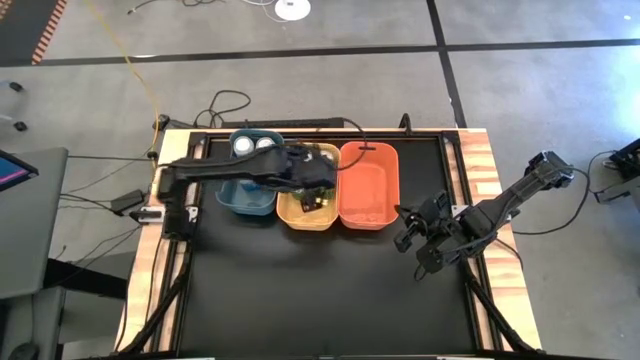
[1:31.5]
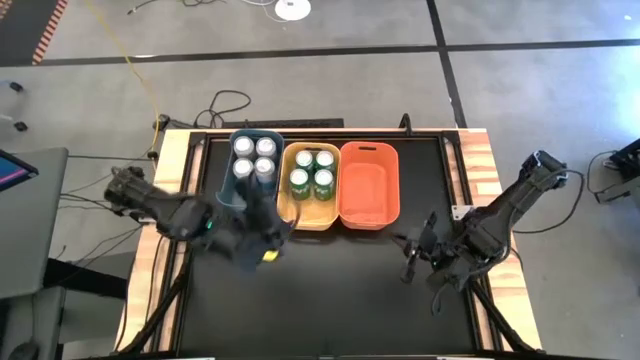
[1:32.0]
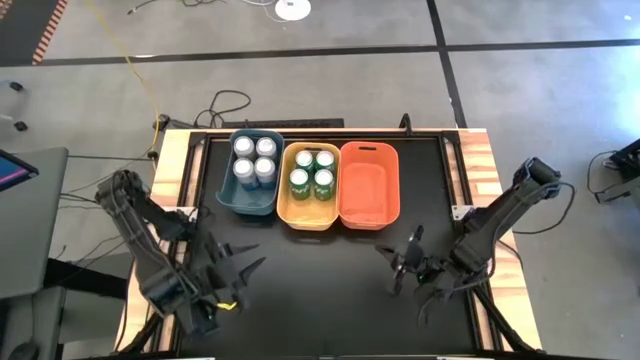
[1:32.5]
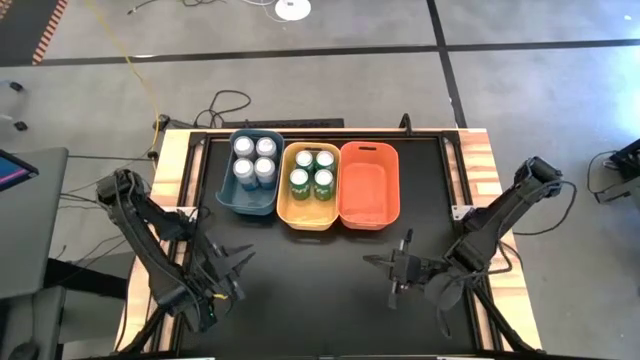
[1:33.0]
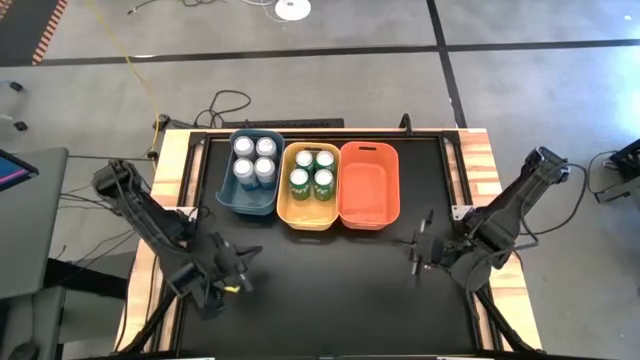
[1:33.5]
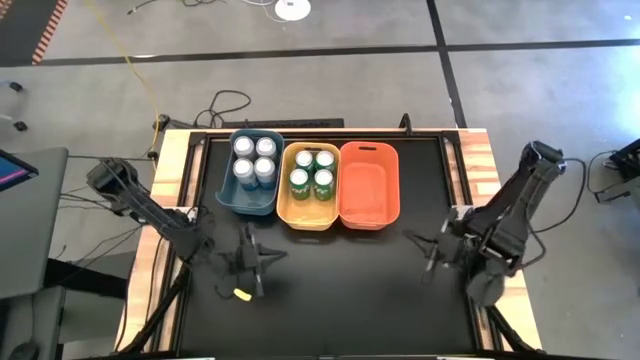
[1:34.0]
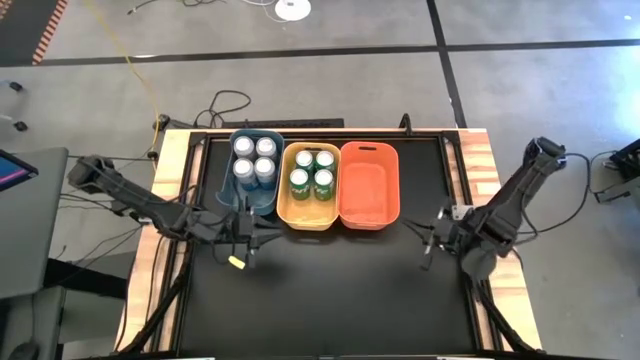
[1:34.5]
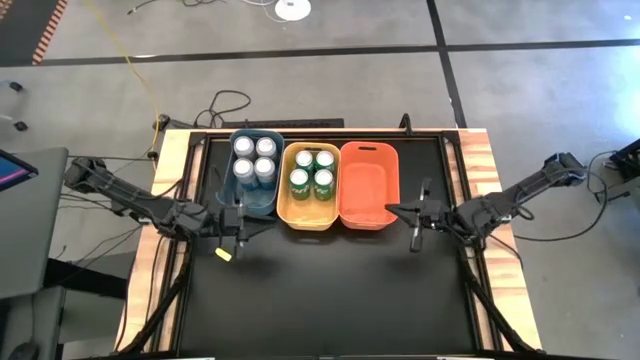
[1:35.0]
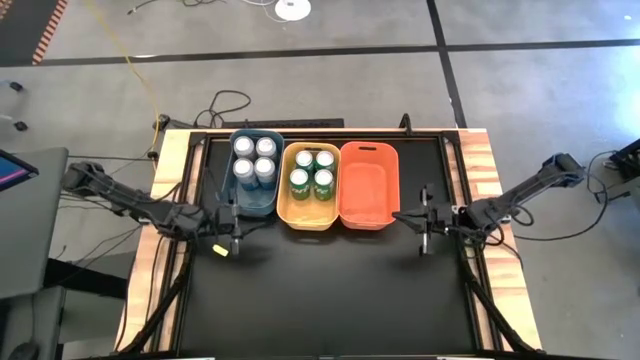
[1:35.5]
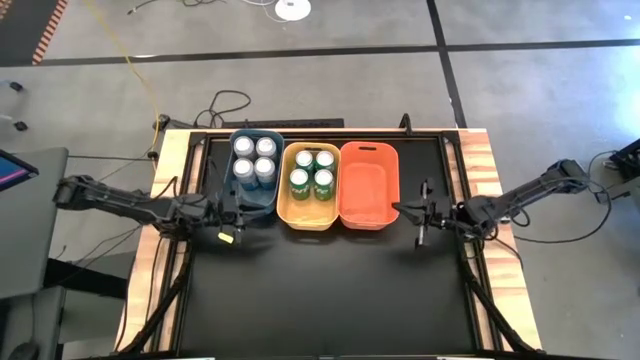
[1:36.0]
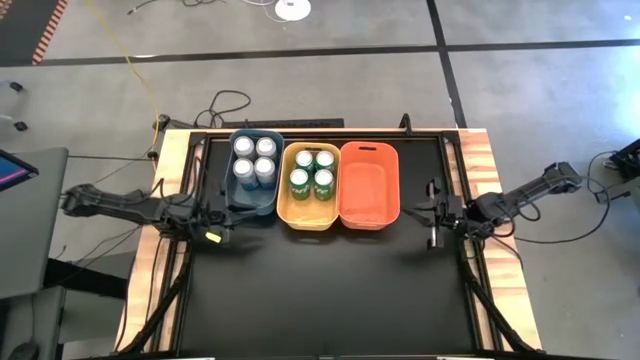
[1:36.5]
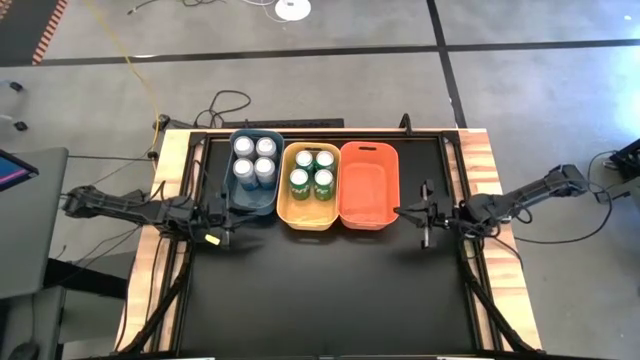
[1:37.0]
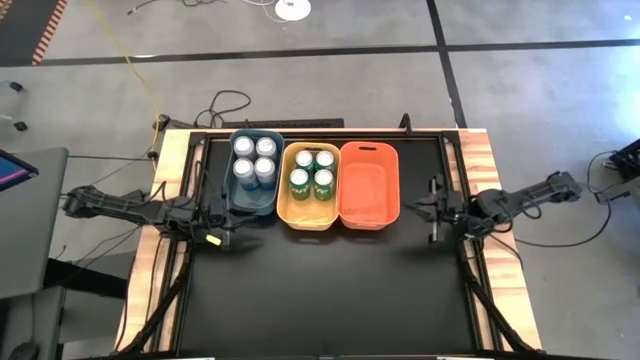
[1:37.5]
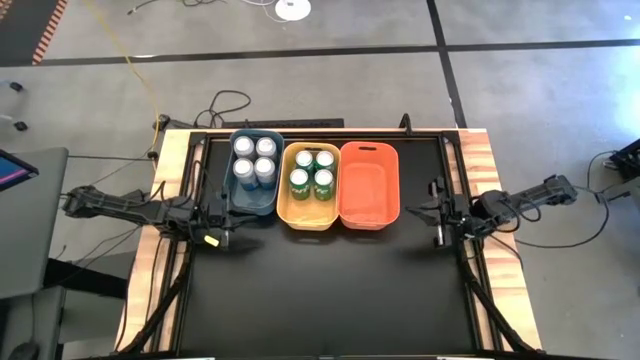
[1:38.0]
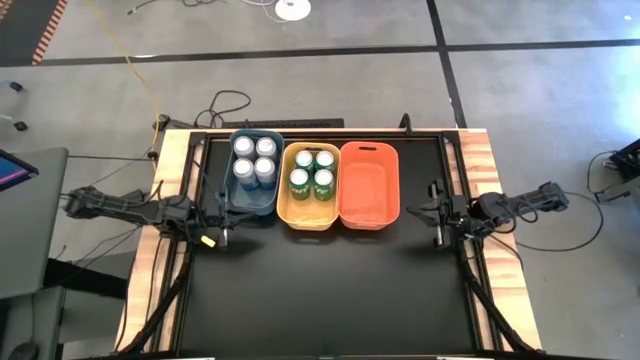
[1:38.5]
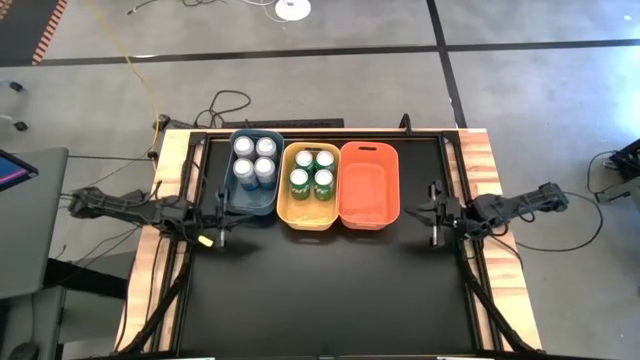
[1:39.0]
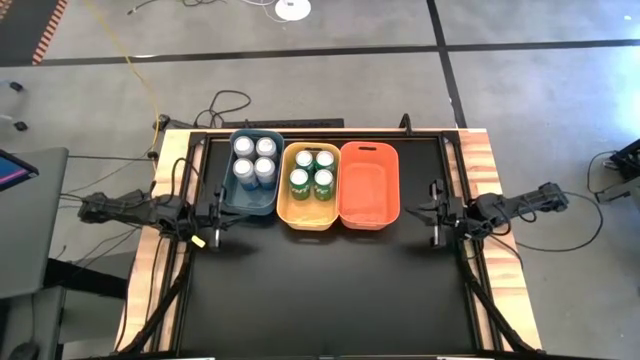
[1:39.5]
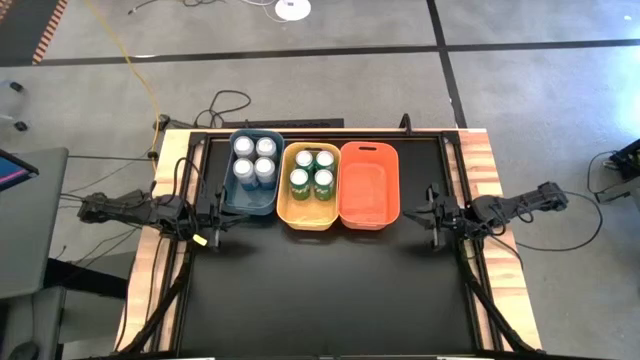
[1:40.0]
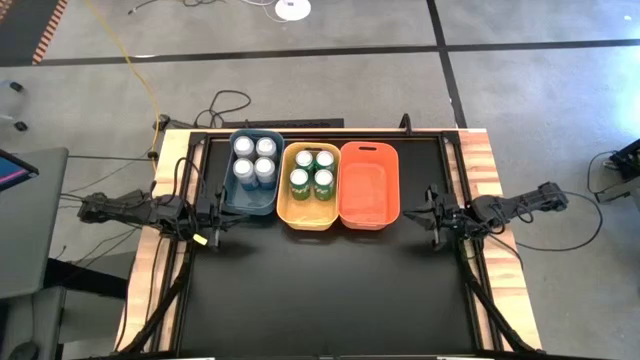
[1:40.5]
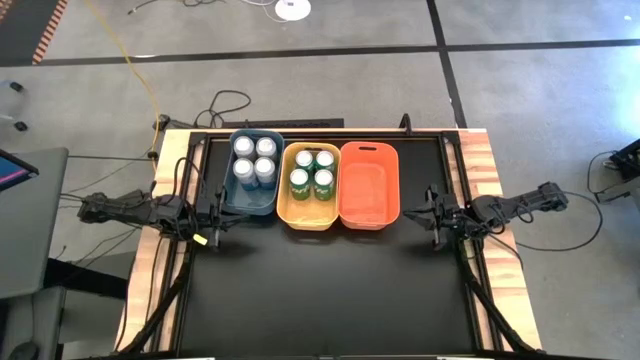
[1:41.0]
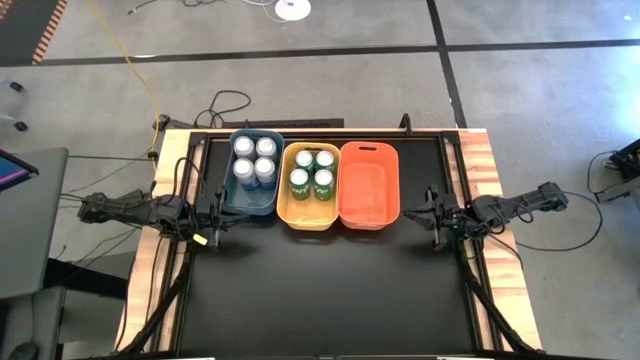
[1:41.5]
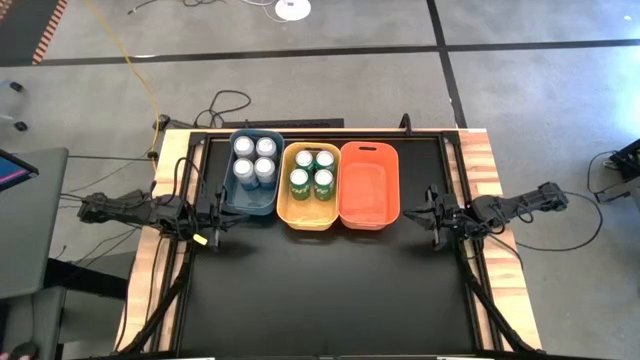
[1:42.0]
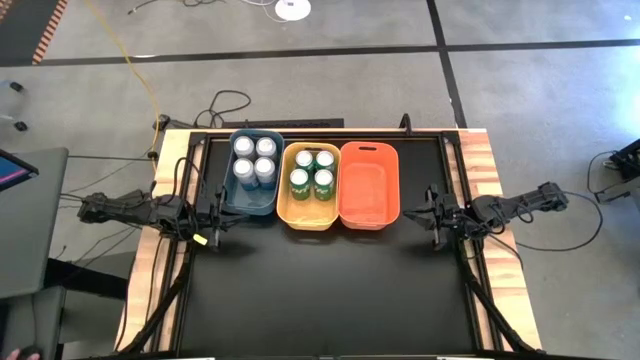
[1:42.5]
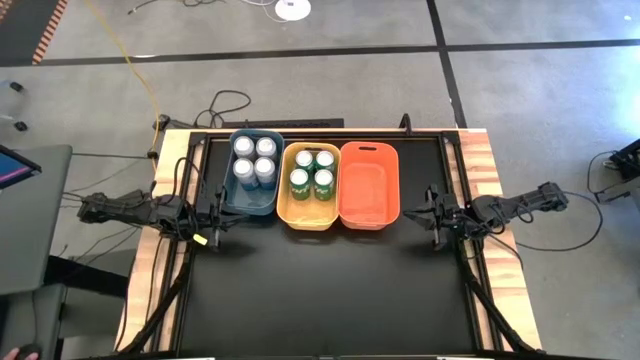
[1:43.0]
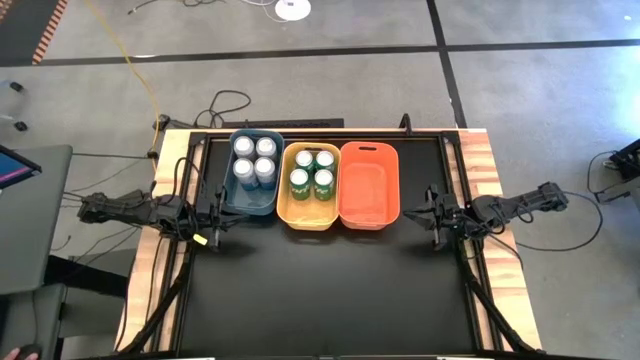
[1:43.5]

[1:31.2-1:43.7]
Task: Sort soda cans
Return to Home Position

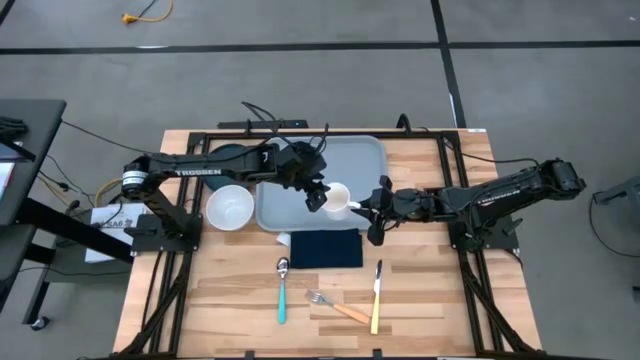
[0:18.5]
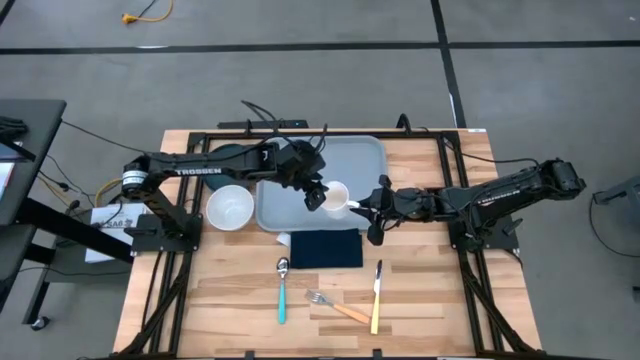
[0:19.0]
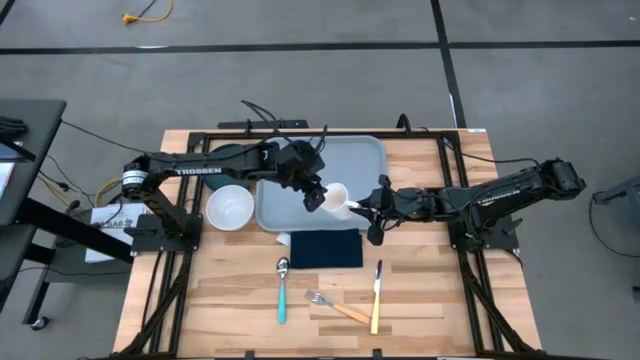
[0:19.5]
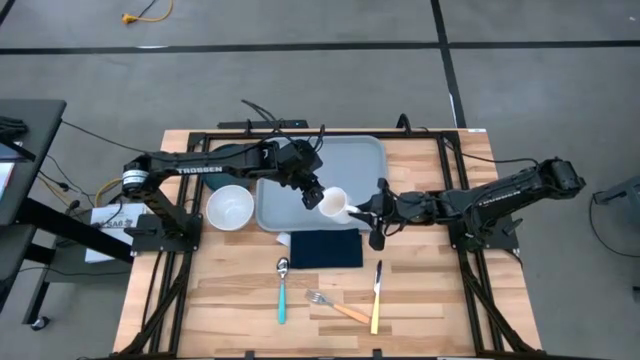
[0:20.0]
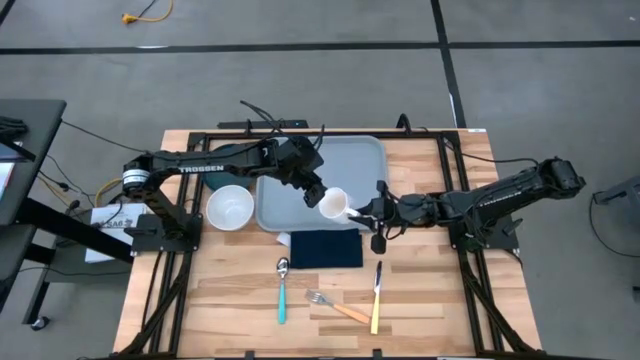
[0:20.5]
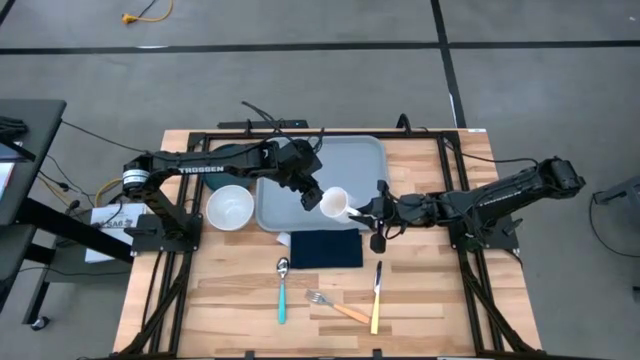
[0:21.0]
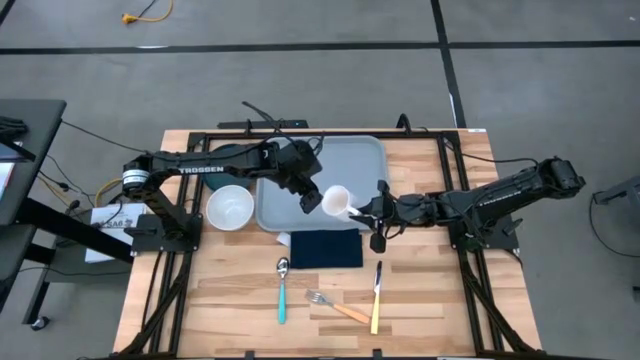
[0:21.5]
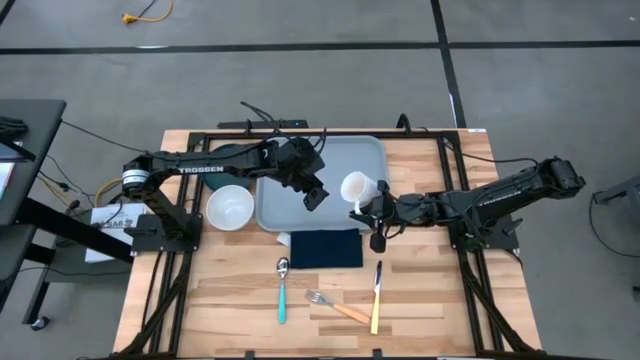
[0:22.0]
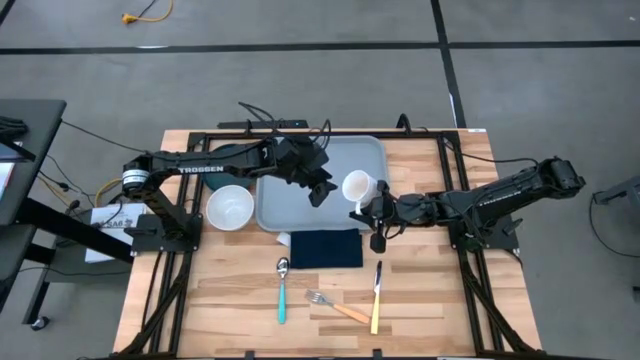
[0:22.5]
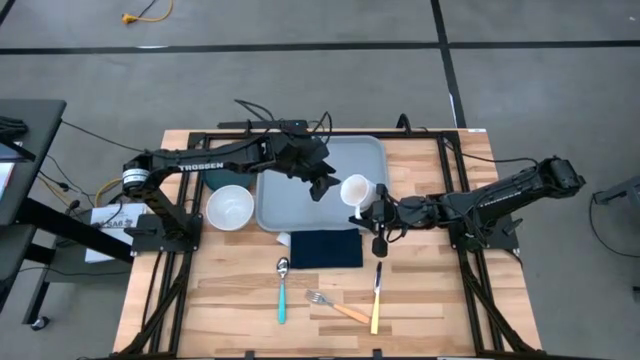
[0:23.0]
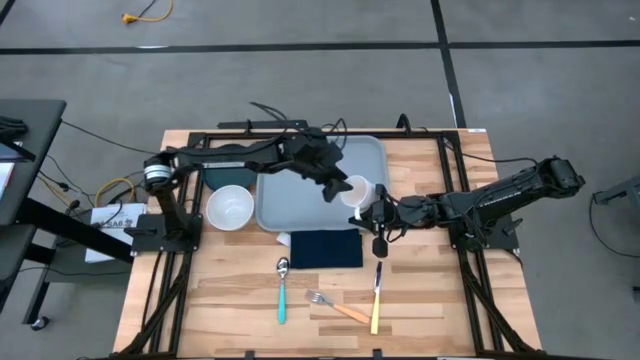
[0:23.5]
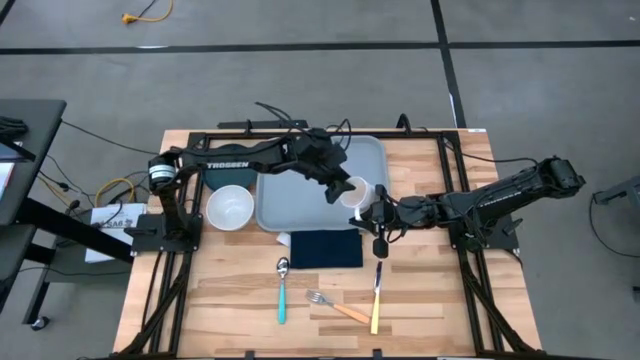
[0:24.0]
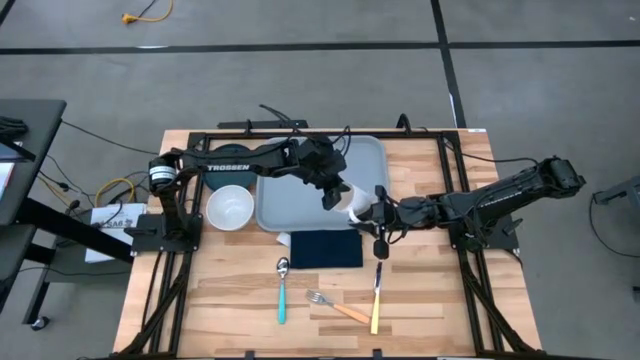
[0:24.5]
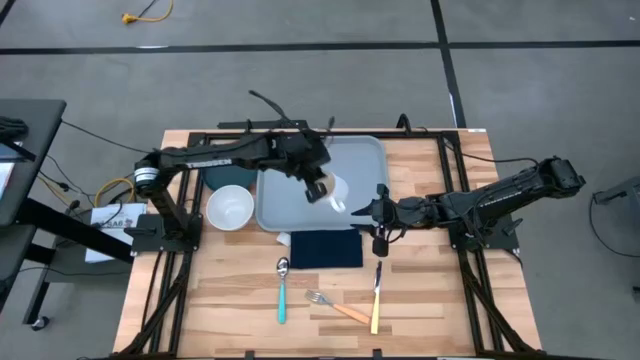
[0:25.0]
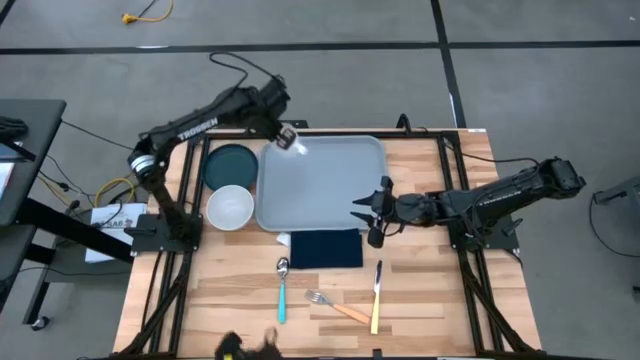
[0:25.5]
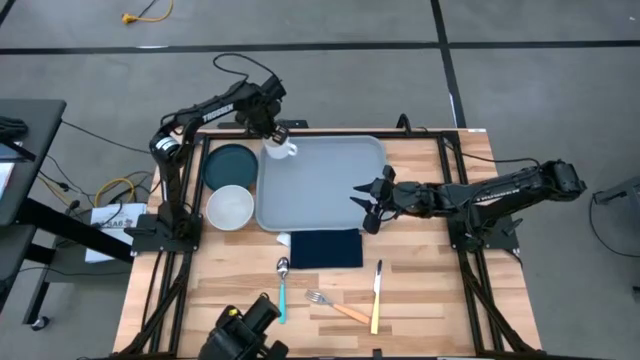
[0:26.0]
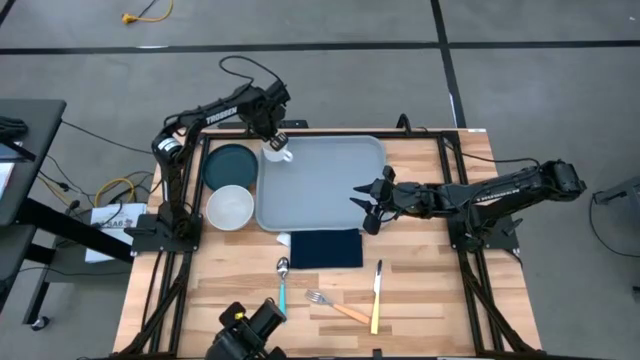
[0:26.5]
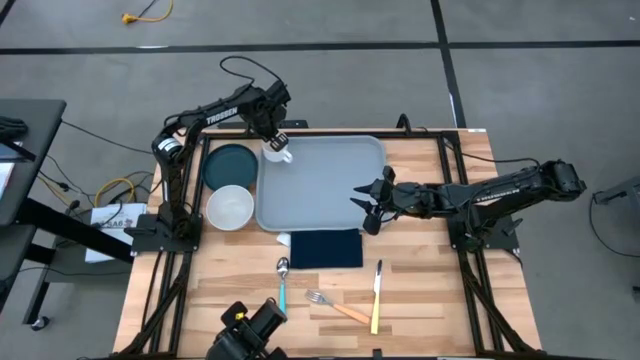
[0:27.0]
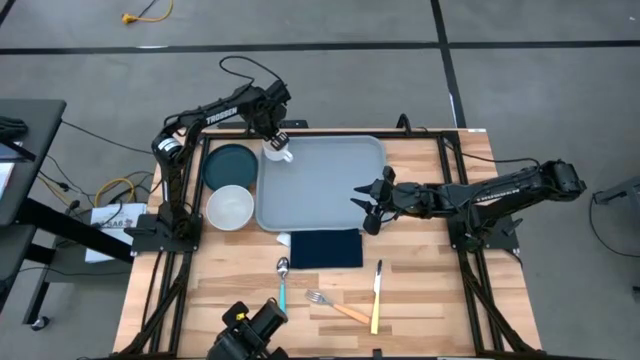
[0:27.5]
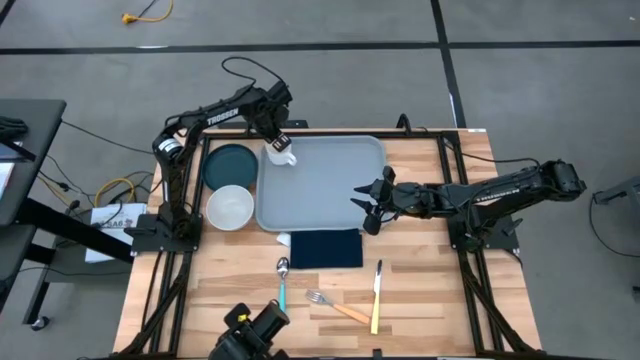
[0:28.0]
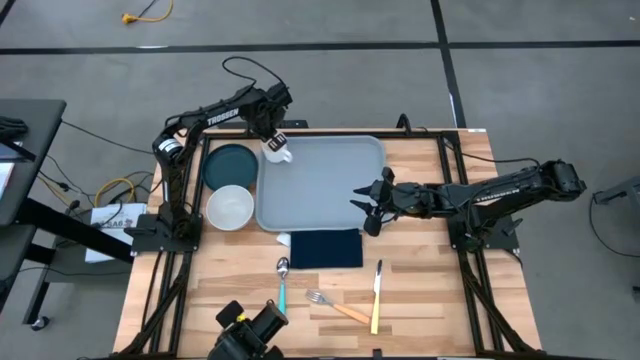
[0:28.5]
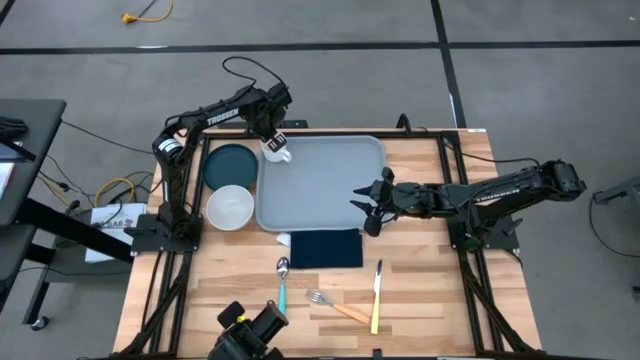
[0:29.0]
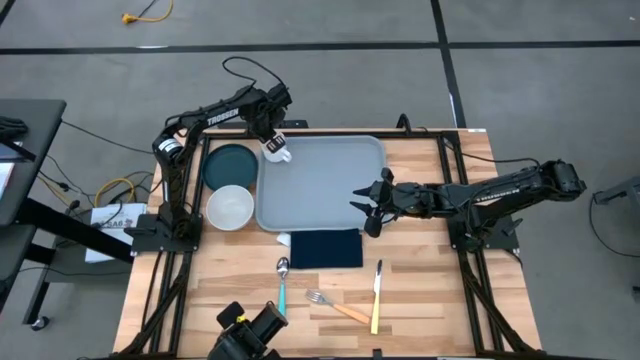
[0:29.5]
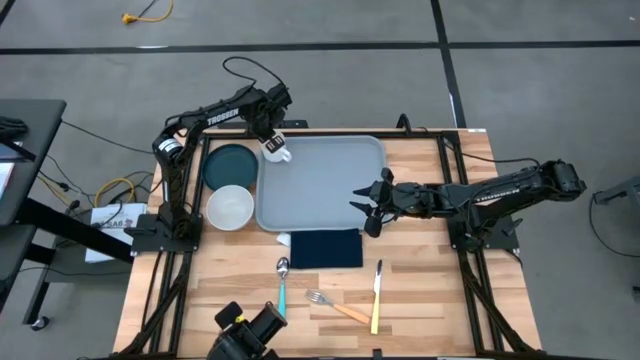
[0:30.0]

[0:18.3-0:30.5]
Task: Set up tray
Put the white cup on the top left of the gray serving tray
